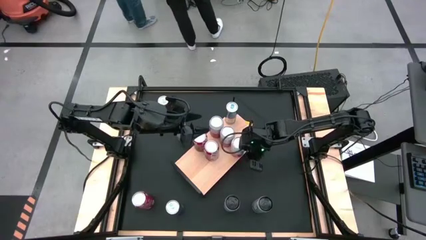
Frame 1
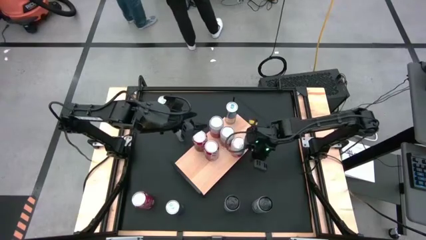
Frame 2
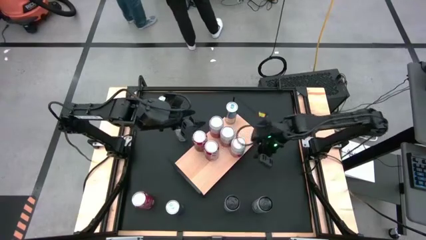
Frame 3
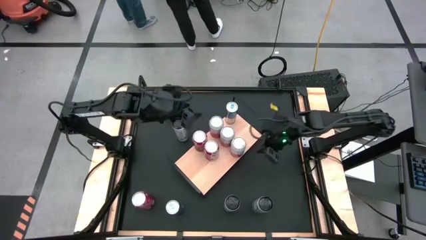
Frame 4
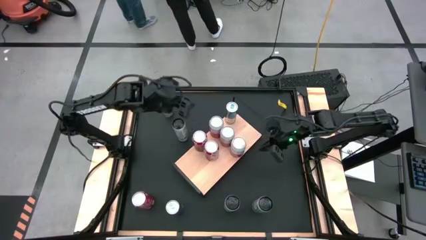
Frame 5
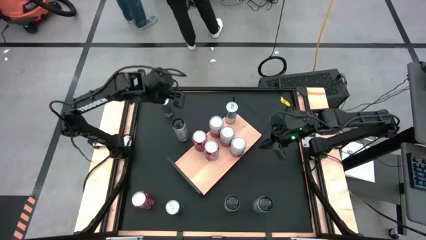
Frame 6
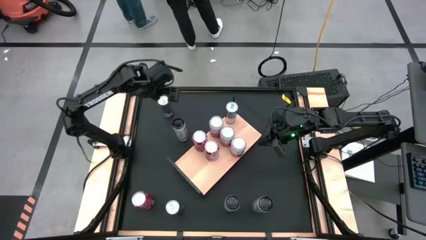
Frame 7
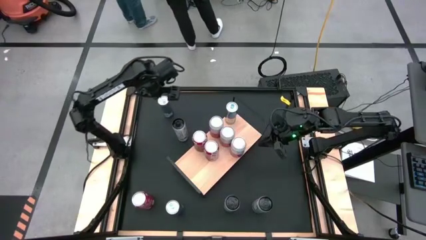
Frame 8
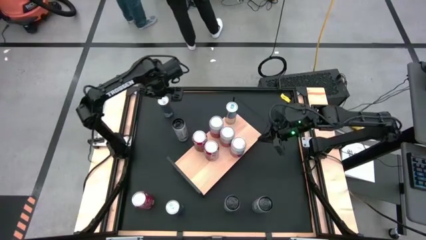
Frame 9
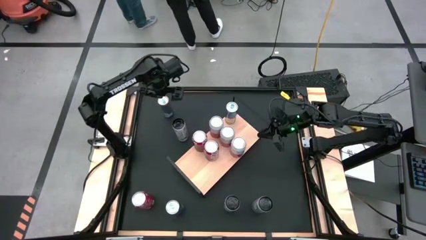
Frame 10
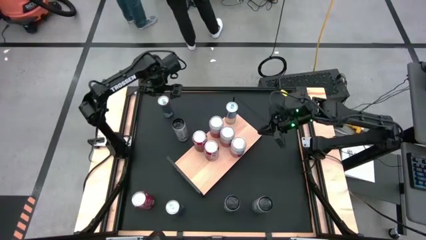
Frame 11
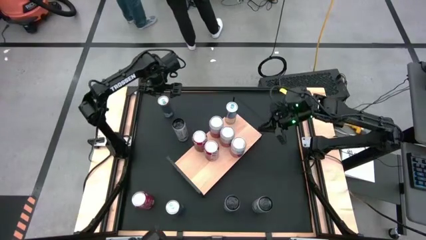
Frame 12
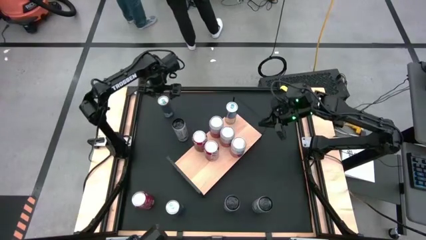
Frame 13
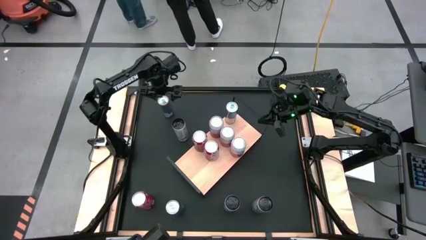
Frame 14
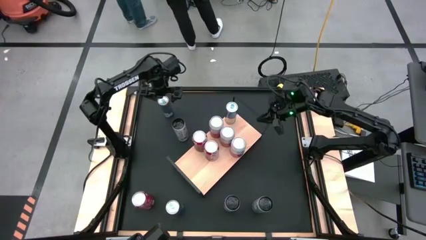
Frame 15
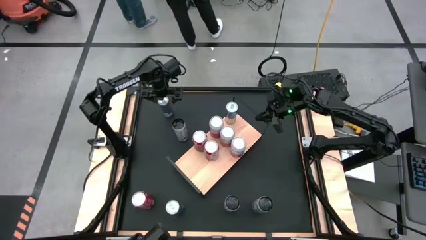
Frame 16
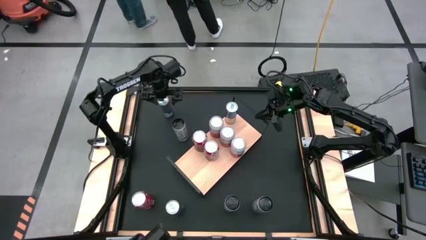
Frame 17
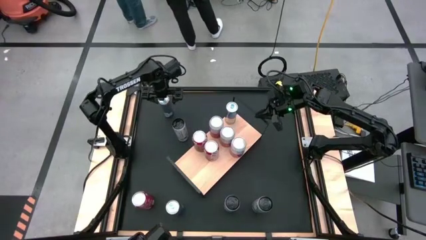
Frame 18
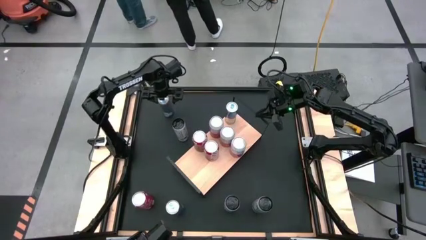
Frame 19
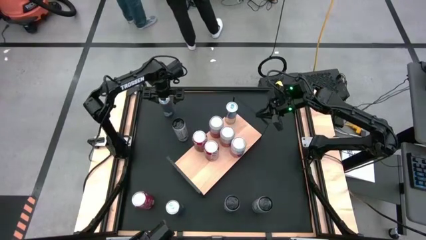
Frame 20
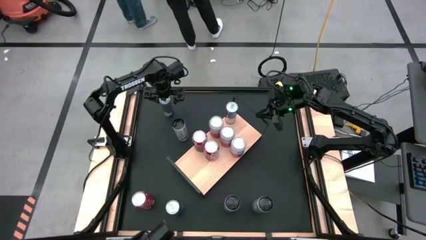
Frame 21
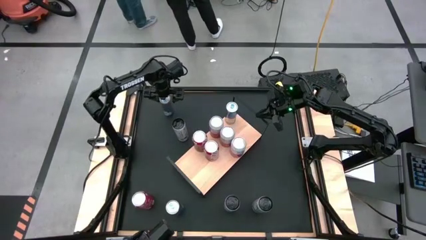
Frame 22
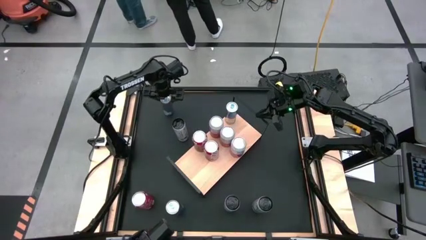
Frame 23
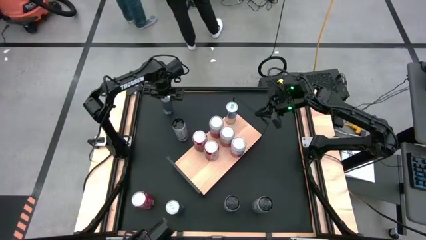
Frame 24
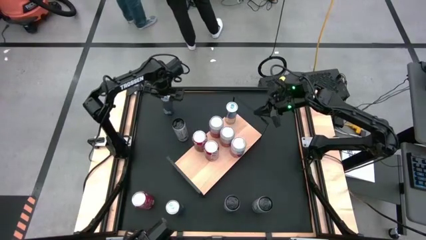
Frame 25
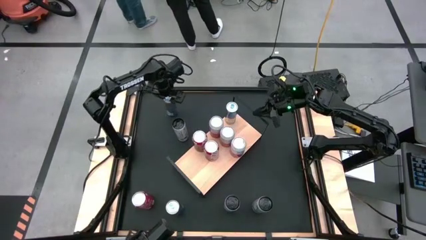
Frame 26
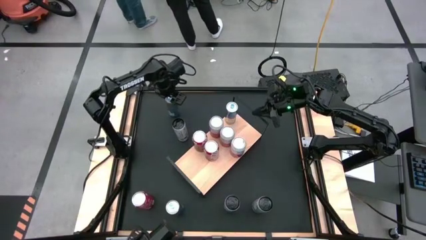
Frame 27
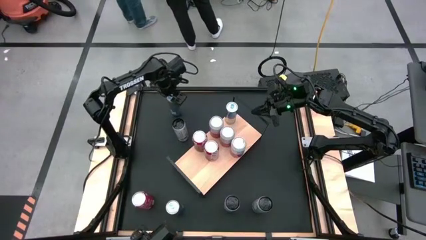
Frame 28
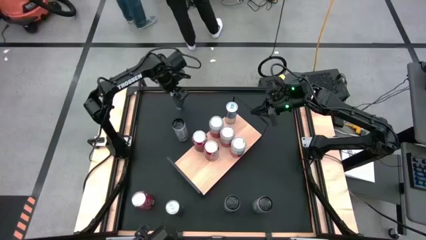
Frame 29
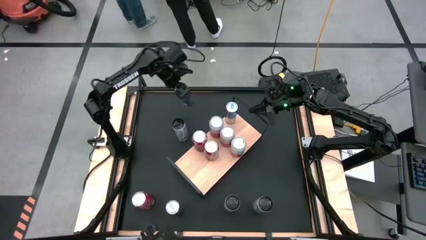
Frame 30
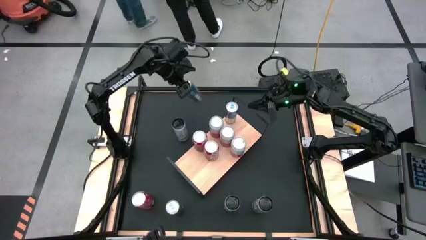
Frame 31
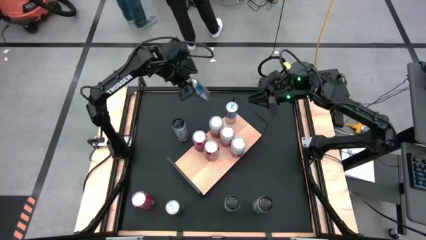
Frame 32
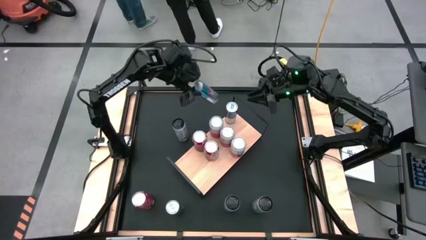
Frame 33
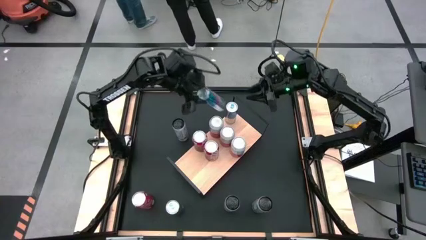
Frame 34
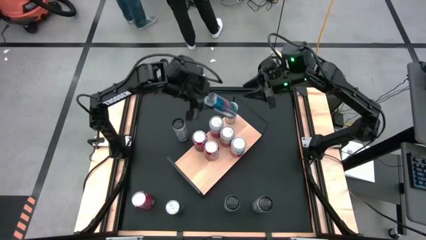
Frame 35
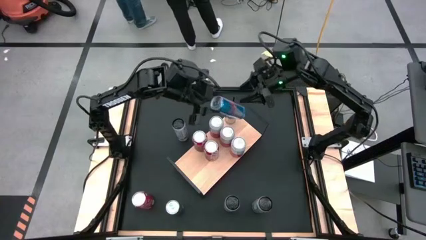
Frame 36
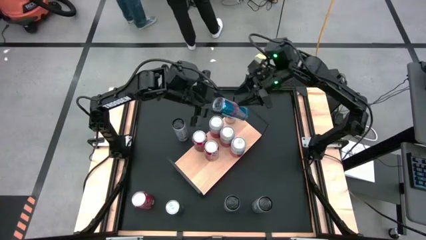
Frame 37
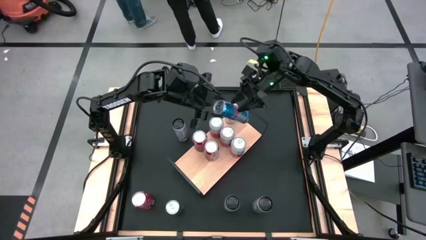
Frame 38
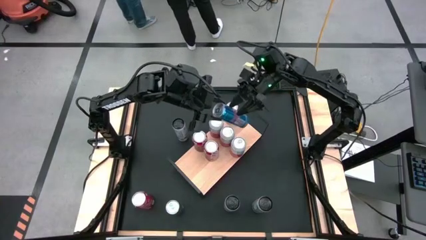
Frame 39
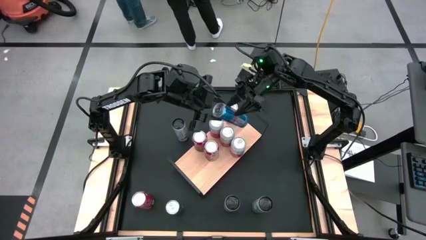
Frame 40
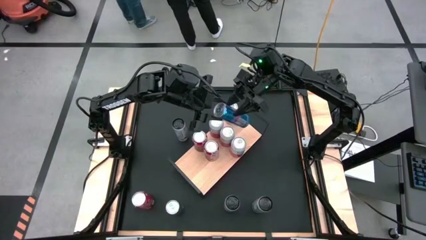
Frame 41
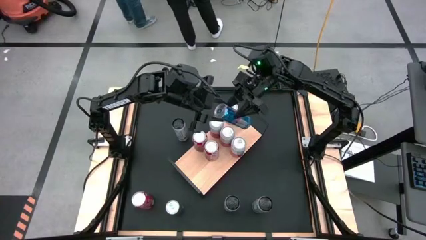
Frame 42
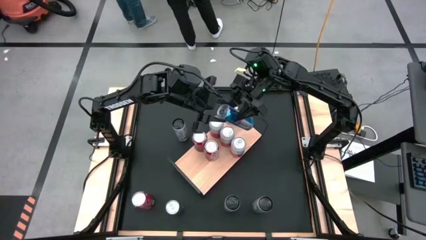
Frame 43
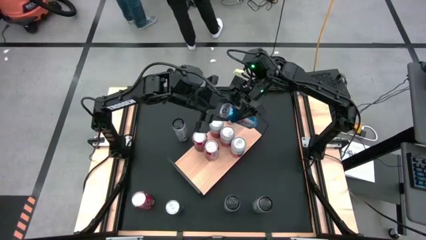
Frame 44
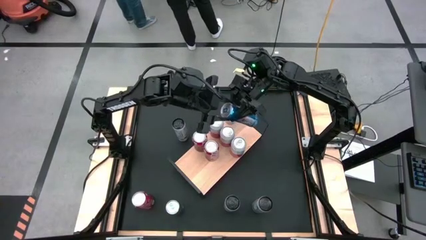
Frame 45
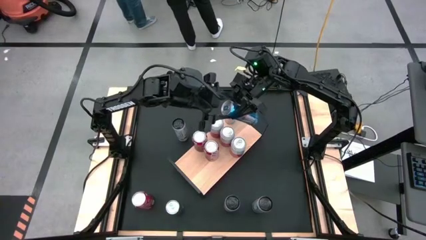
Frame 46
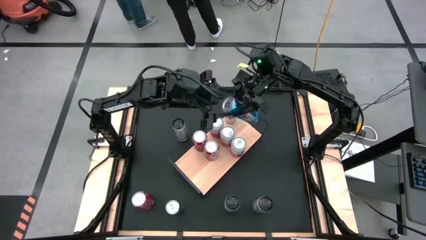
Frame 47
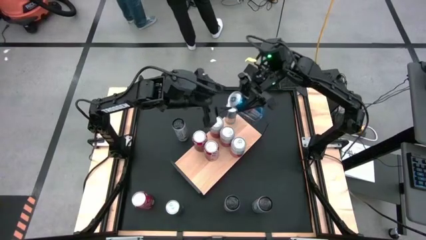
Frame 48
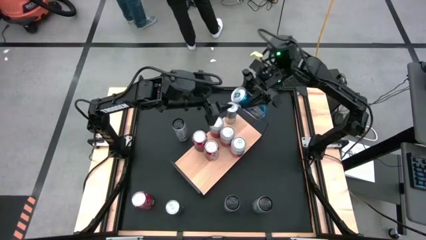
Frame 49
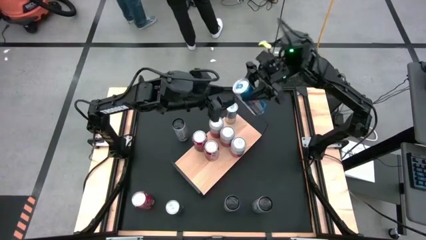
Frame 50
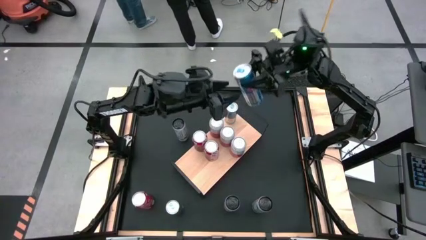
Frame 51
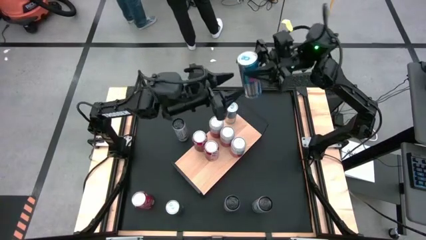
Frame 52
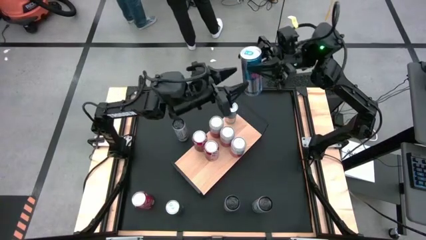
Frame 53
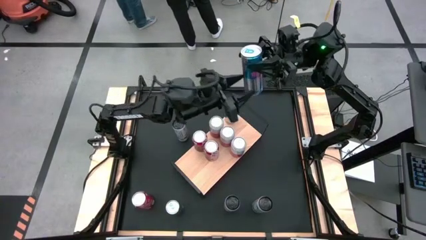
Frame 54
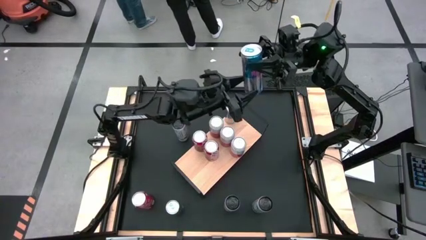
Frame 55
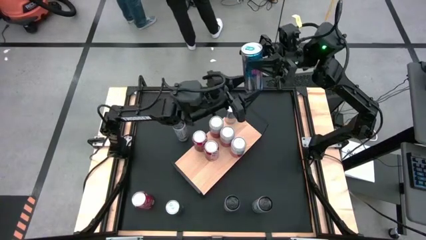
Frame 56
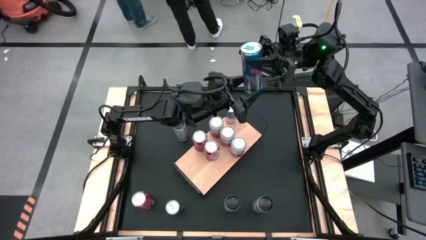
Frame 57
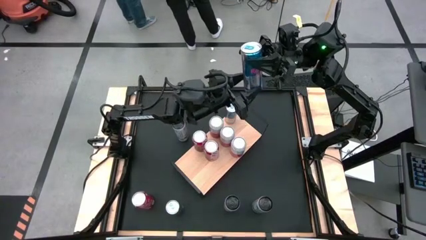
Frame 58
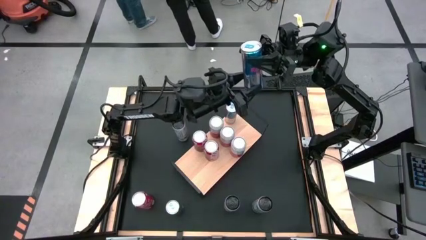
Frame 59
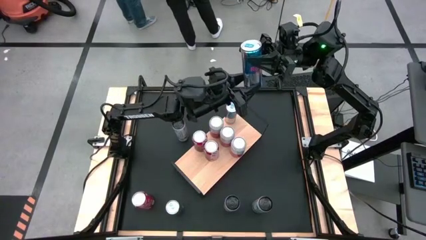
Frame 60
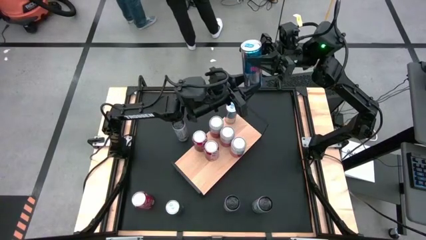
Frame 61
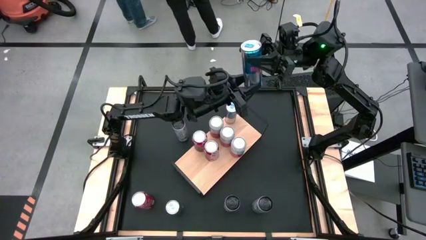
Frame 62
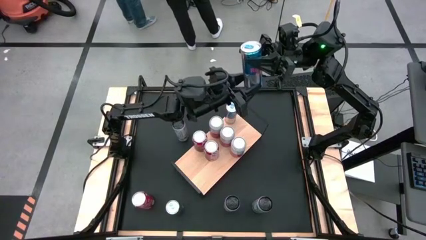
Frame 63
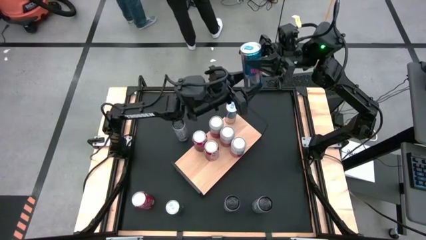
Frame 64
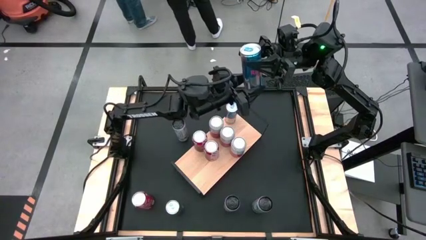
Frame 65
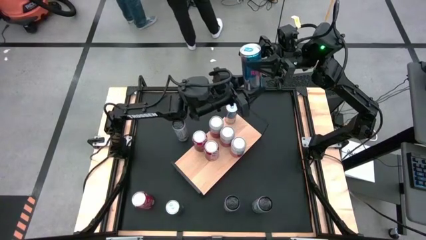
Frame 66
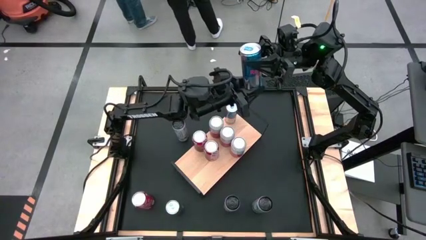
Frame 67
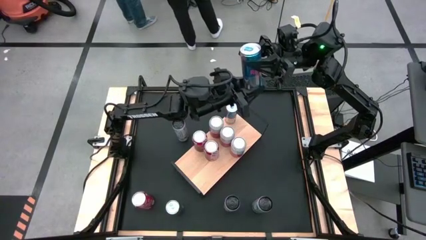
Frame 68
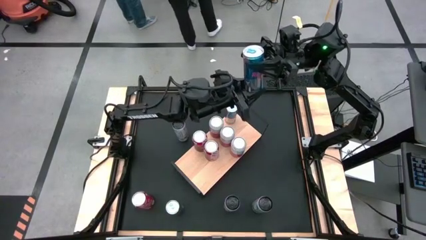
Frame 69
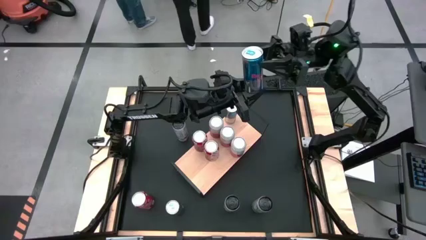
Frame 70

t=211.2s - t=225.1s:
Task: Place canned beverage on shelf
Put the top blue soda can on the shelf
